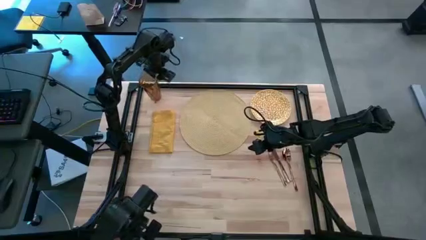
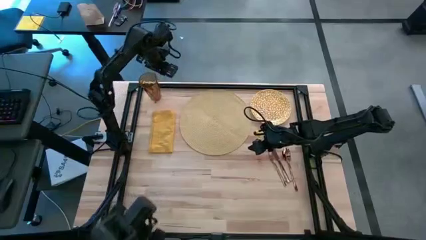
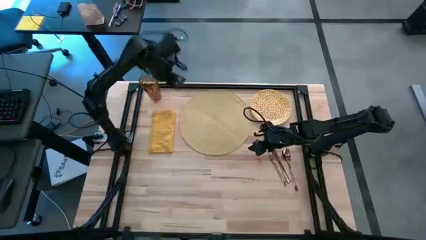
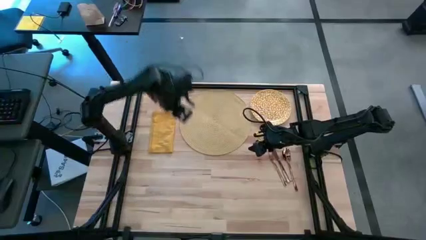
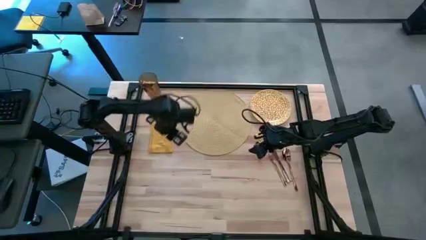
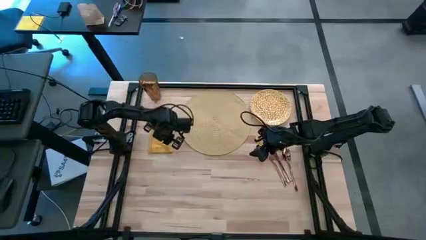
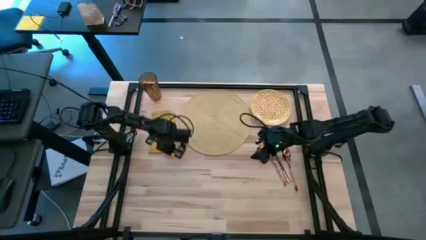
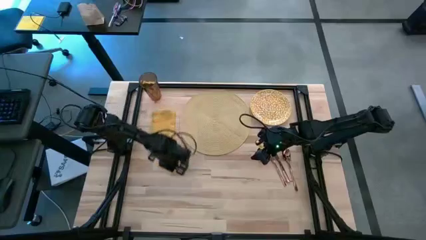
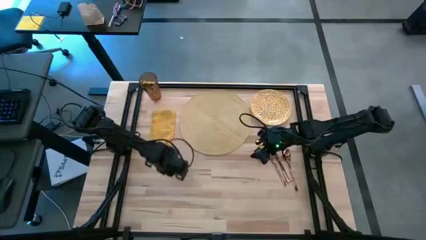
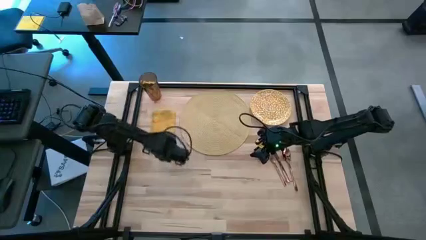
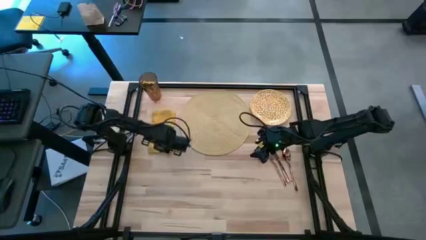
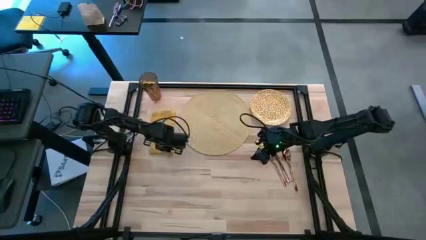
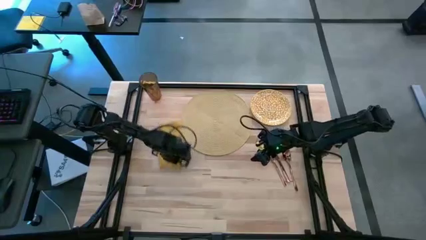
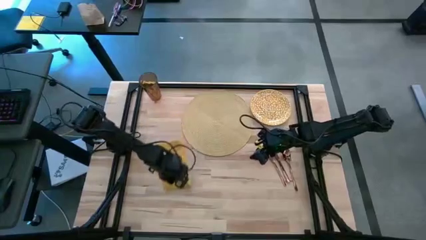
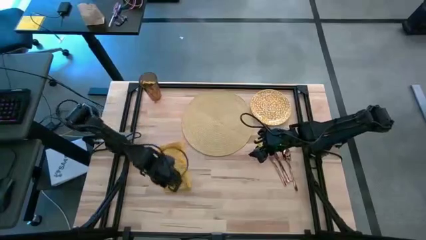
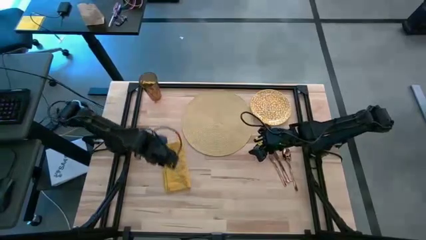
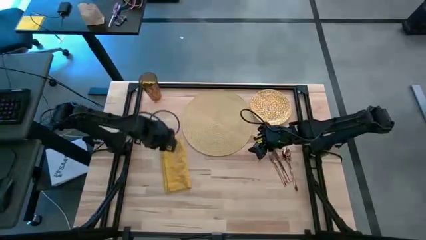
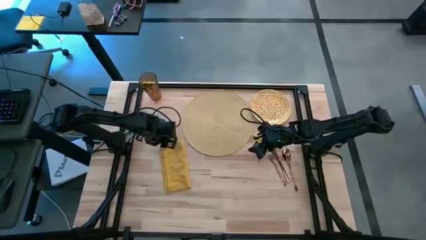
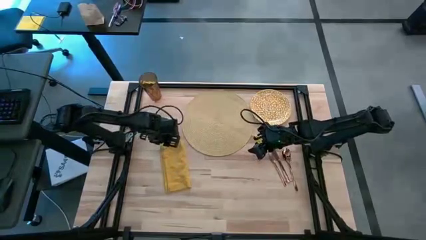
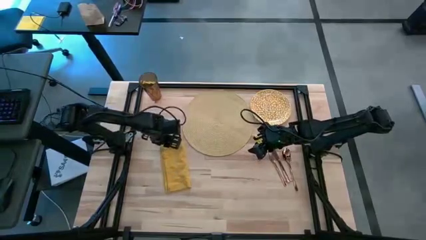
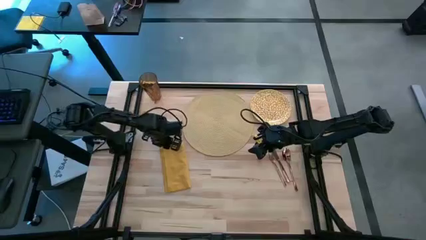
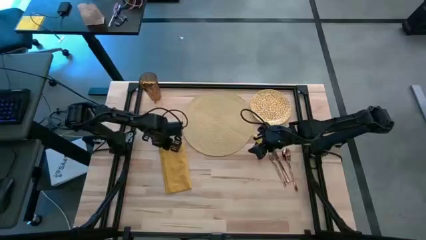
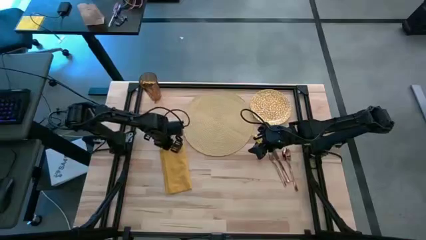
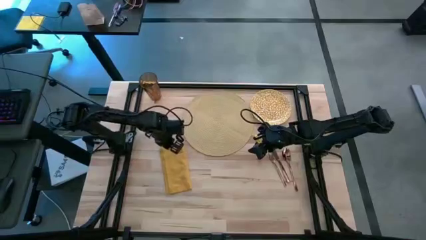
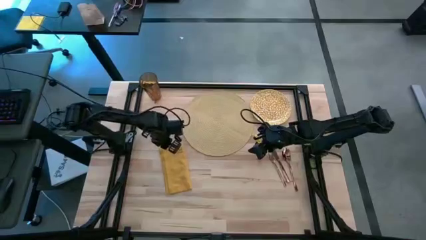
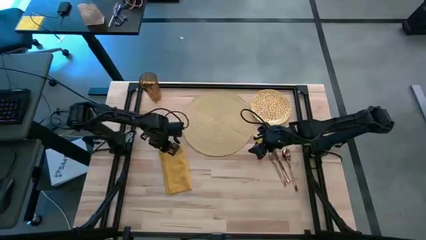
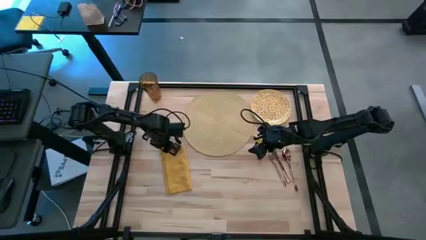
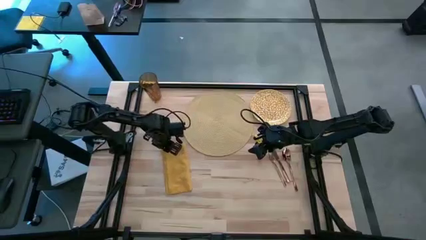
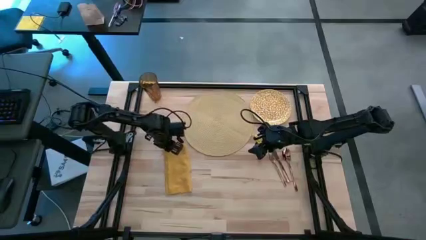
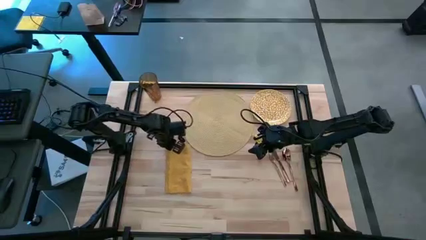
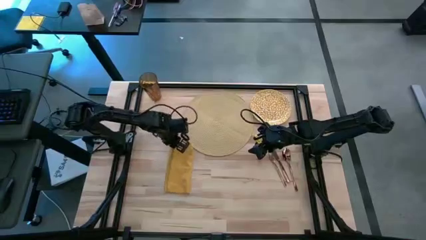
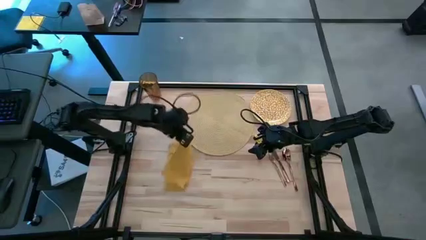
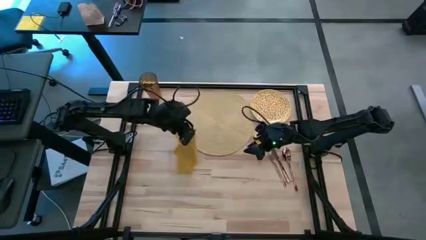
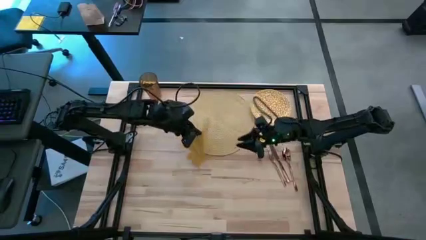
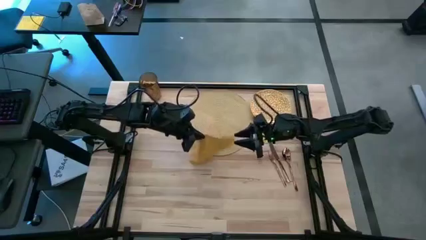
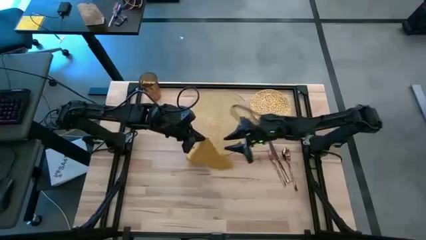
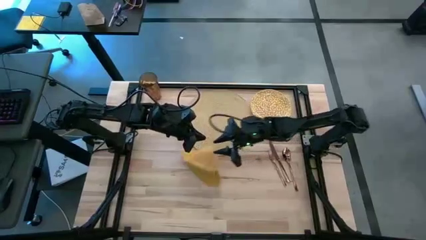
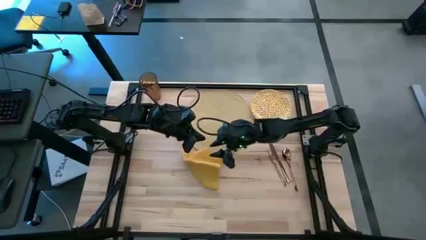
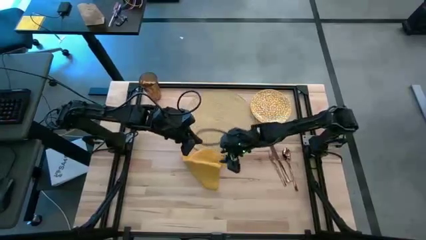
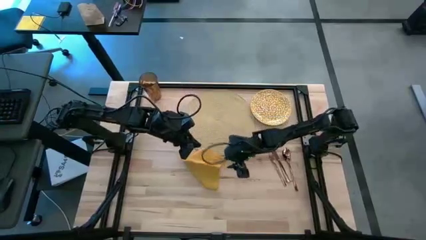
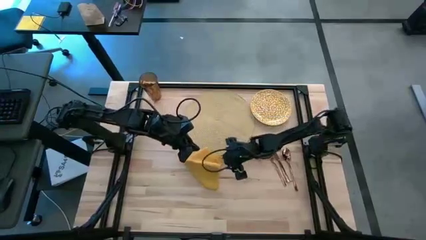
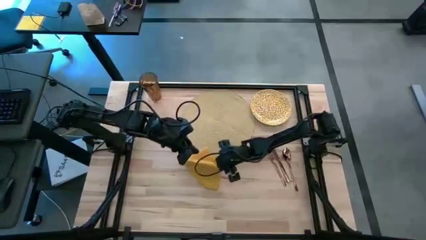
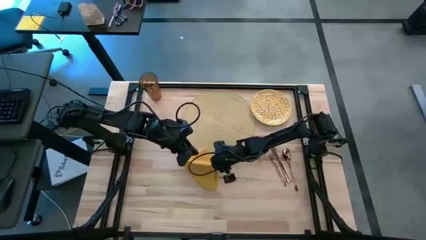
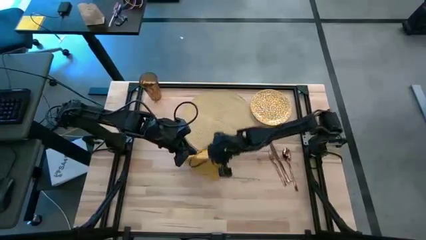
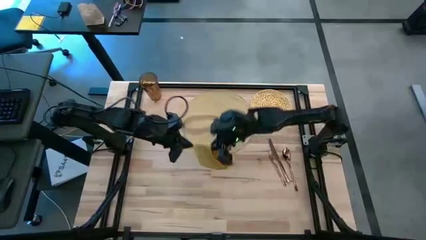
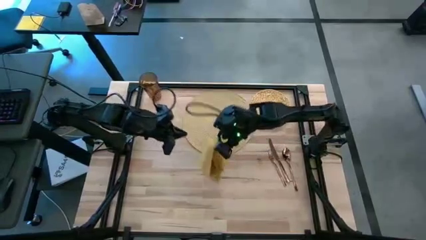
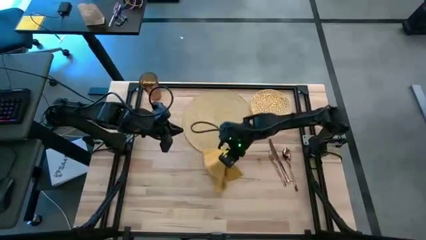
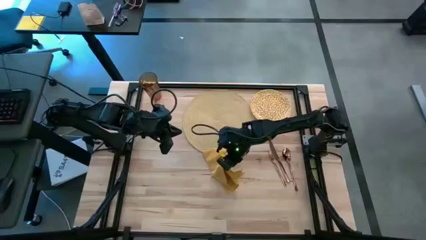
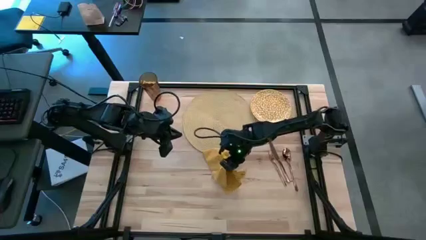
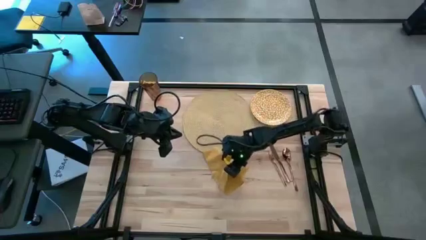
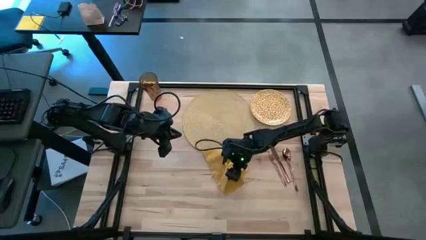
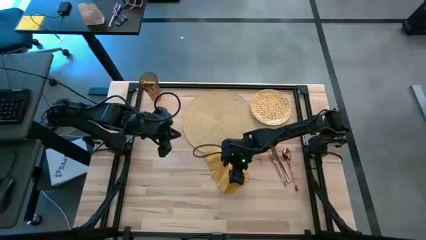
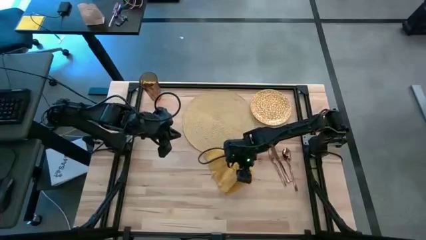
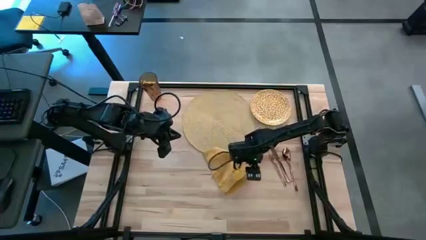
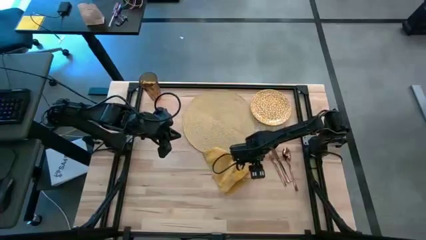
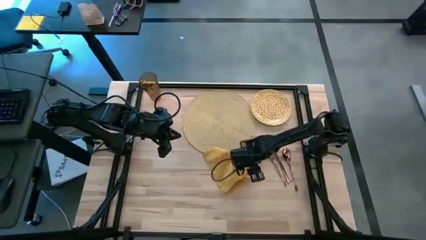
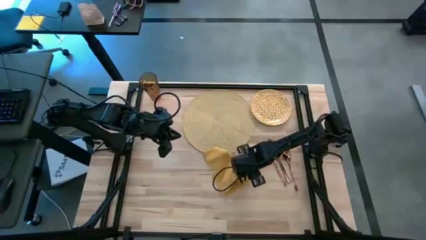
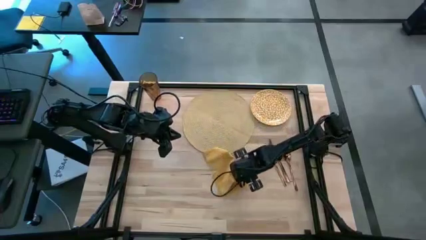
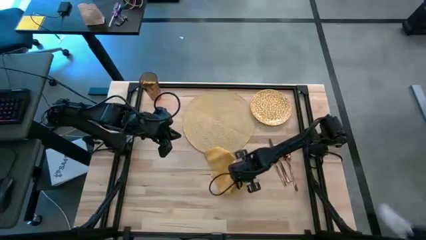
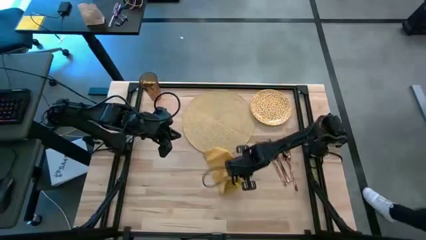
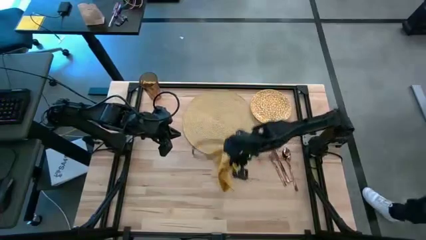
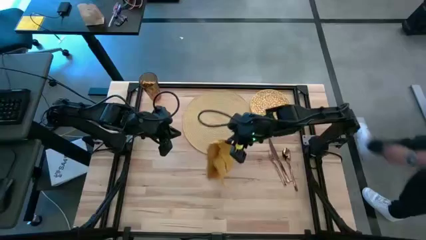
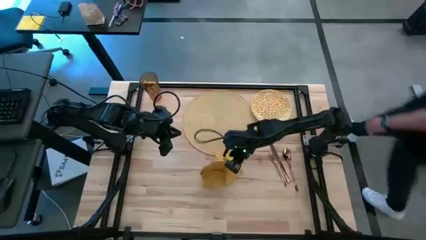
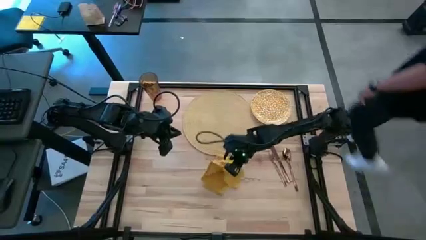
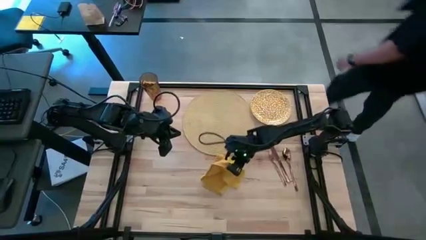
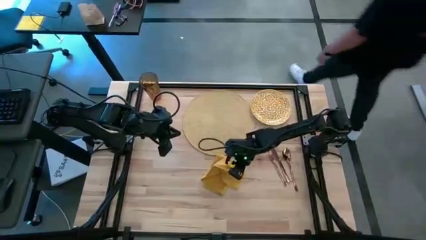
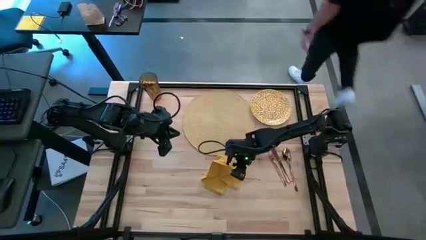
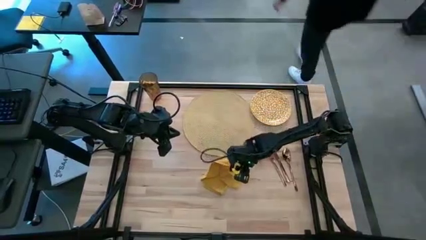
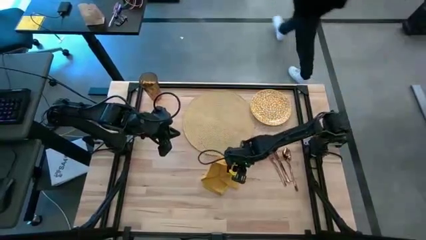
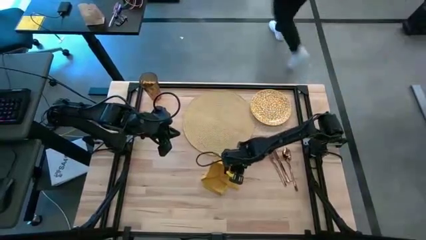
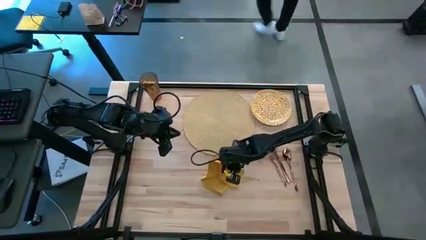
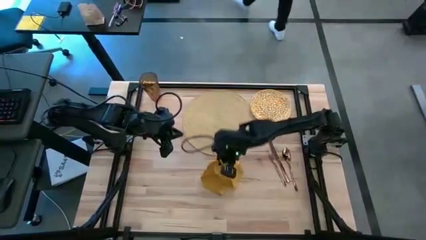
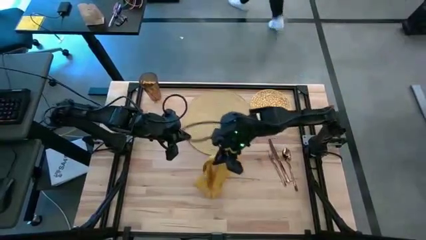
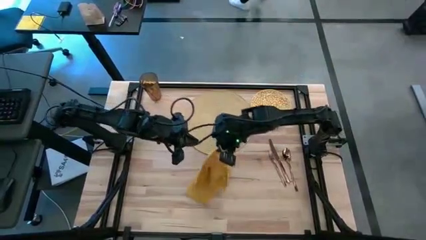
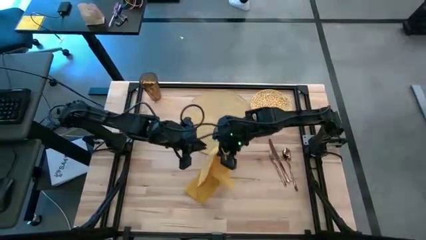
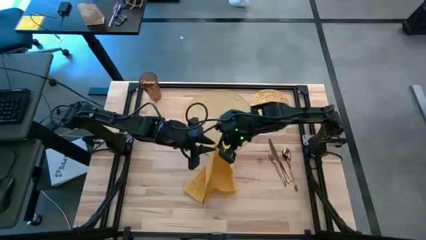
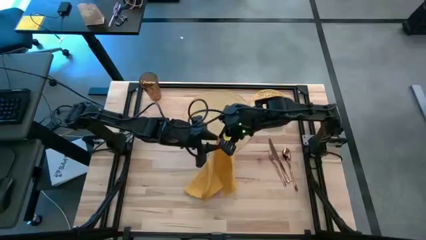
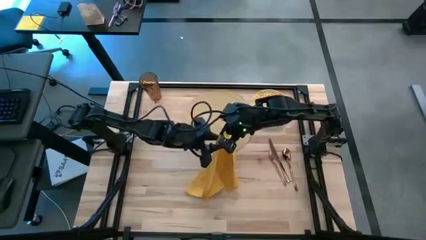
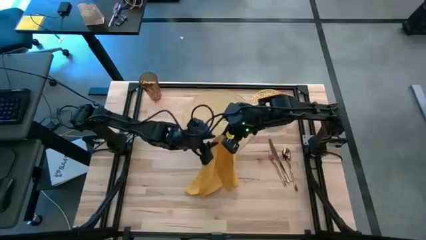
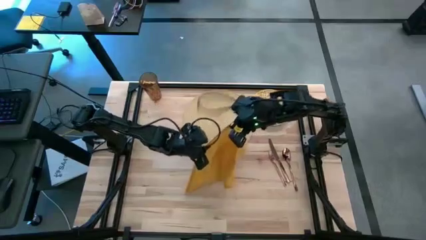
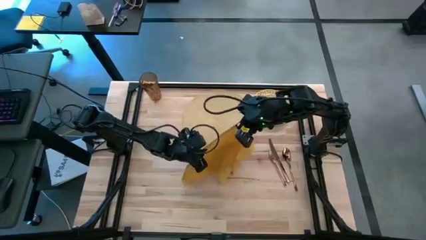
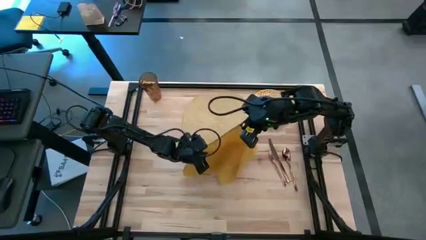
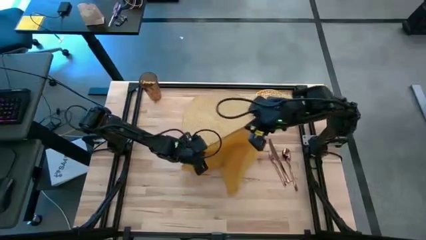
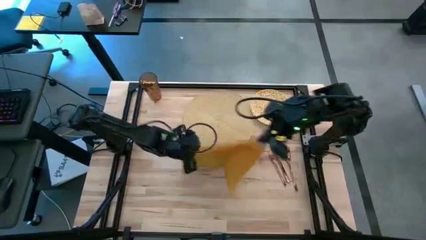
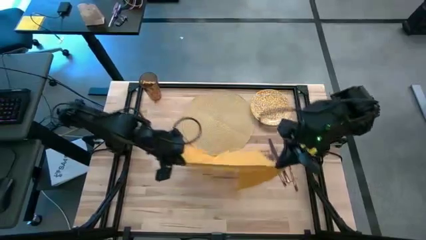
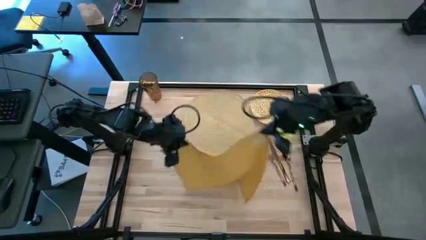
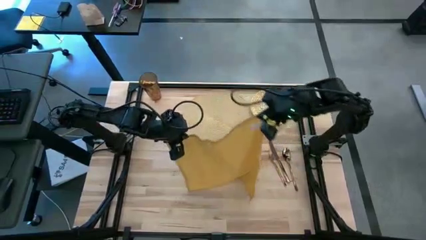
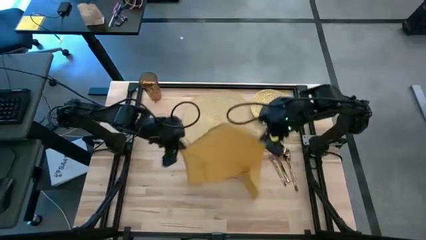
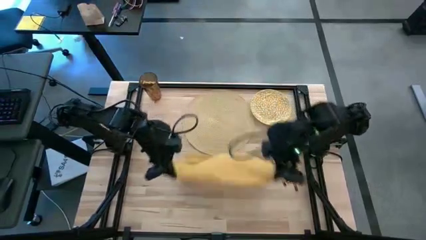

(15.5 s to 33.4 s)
Task: Set table place
Fold the yellow table napkin
